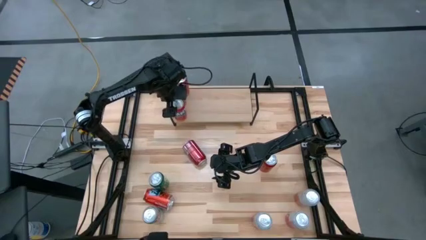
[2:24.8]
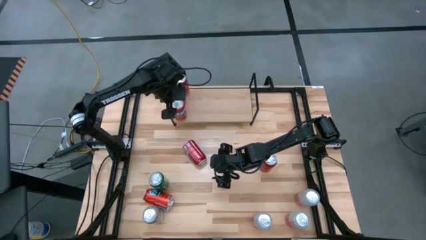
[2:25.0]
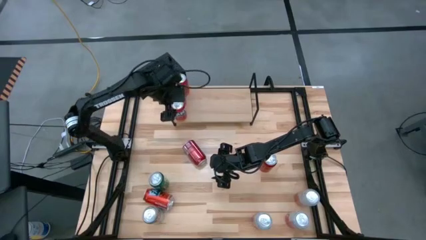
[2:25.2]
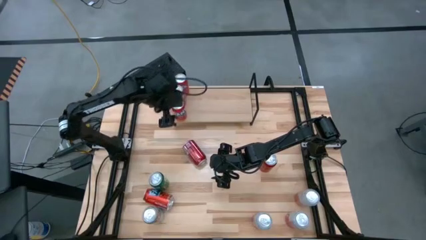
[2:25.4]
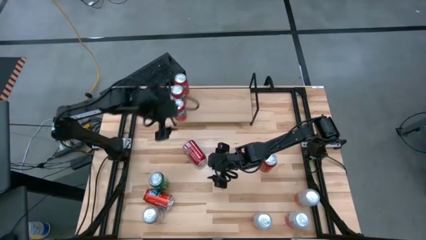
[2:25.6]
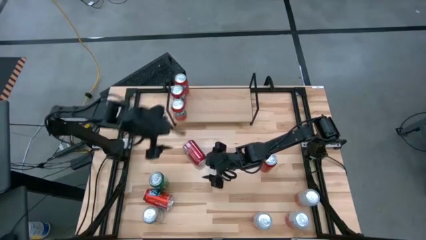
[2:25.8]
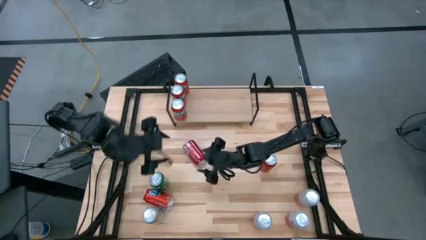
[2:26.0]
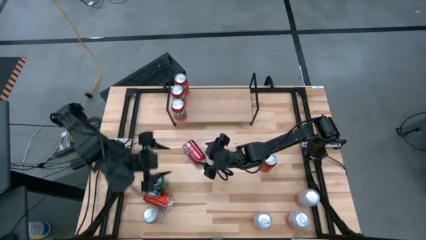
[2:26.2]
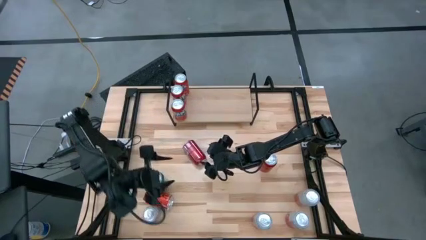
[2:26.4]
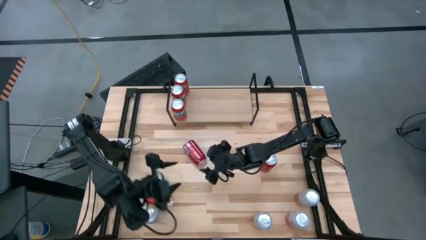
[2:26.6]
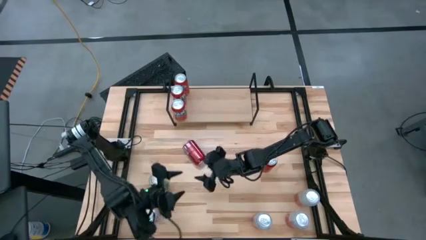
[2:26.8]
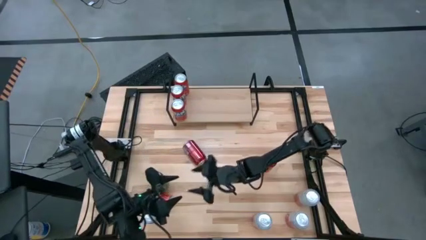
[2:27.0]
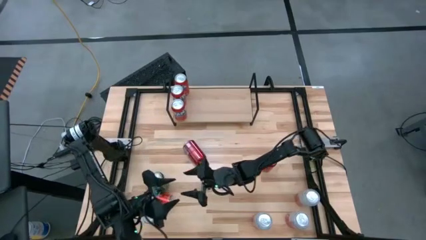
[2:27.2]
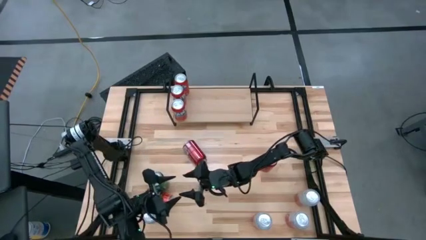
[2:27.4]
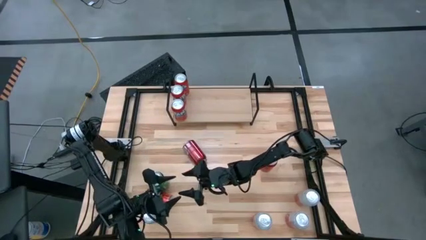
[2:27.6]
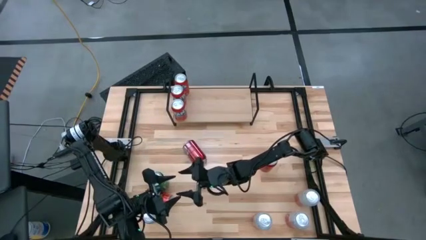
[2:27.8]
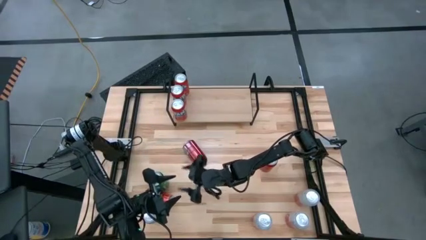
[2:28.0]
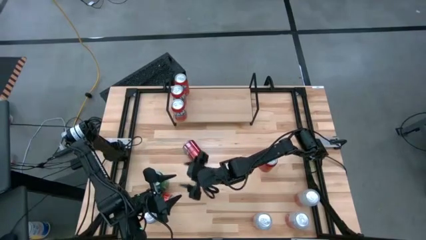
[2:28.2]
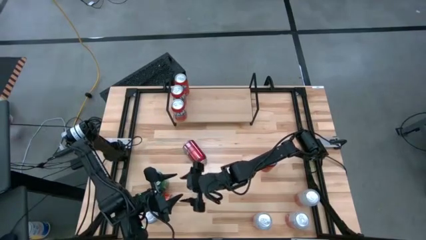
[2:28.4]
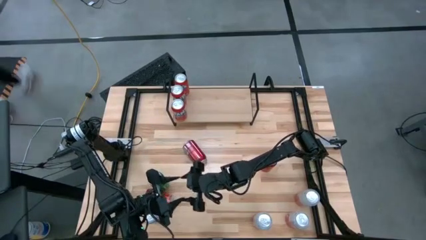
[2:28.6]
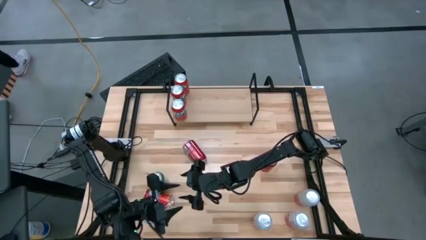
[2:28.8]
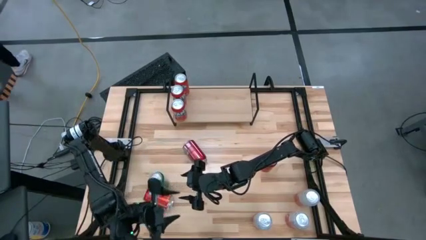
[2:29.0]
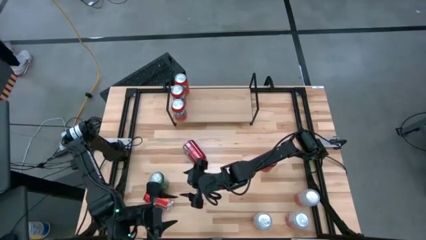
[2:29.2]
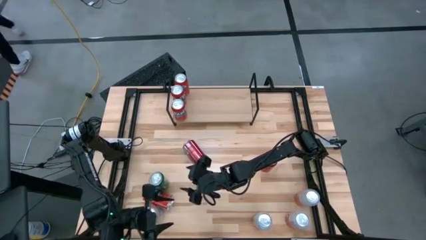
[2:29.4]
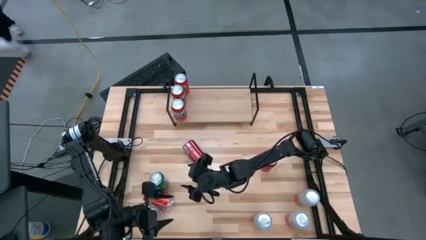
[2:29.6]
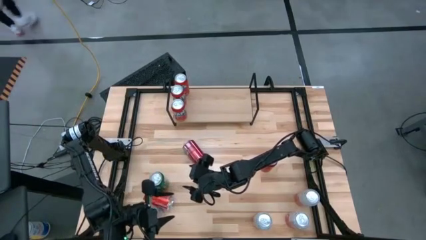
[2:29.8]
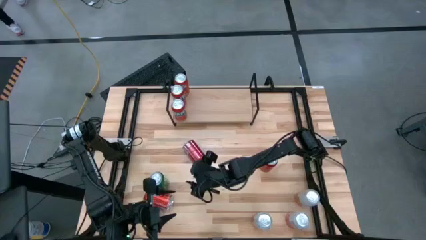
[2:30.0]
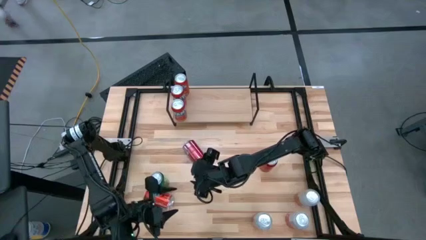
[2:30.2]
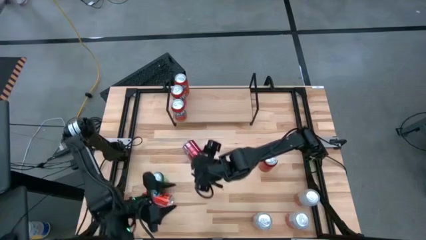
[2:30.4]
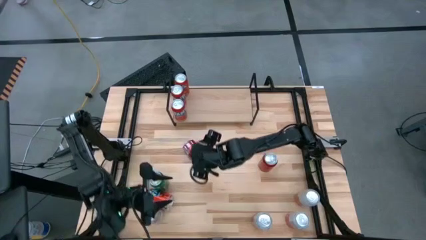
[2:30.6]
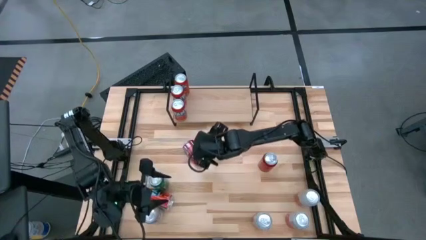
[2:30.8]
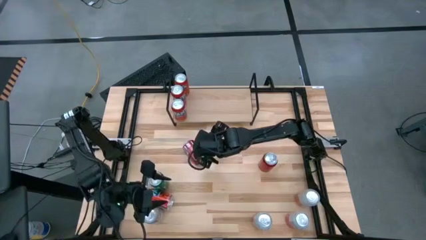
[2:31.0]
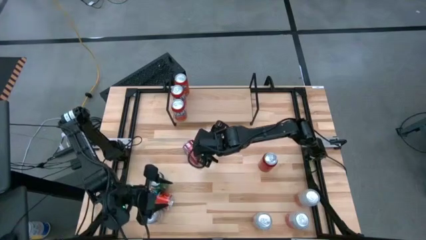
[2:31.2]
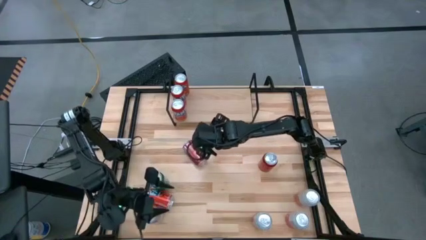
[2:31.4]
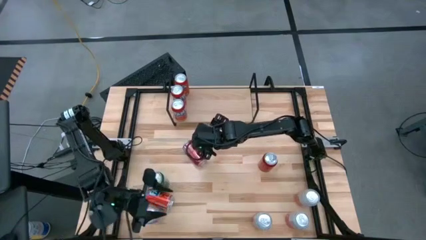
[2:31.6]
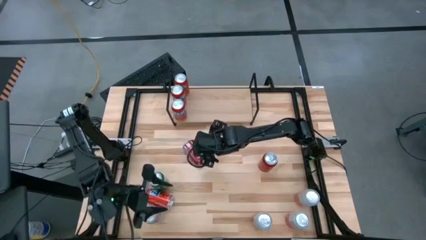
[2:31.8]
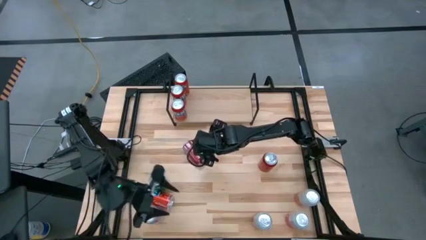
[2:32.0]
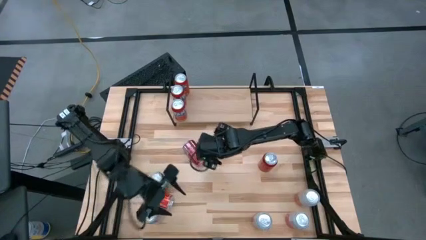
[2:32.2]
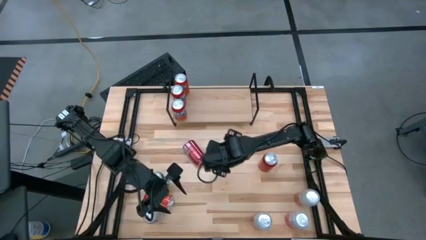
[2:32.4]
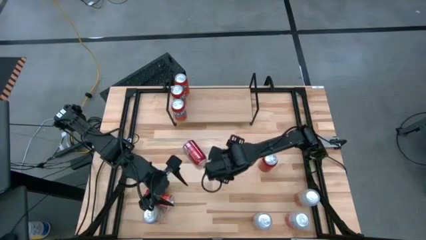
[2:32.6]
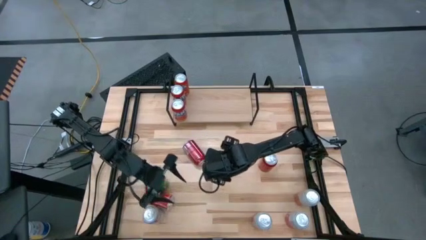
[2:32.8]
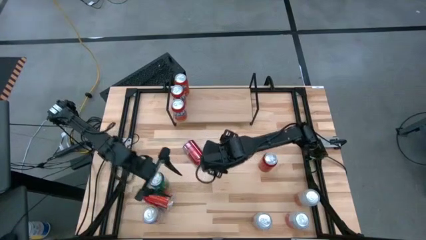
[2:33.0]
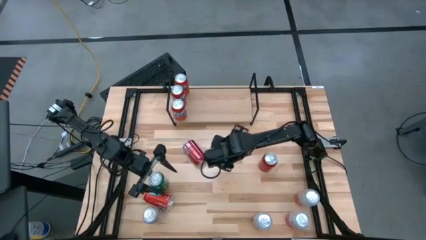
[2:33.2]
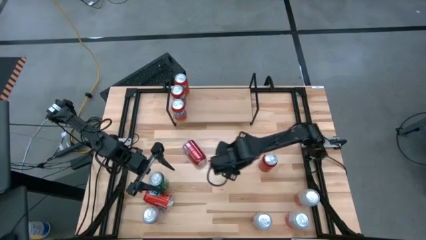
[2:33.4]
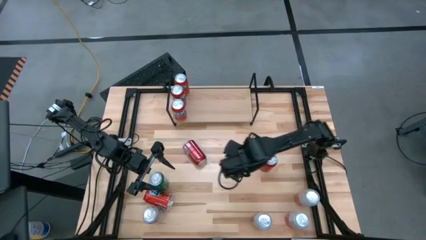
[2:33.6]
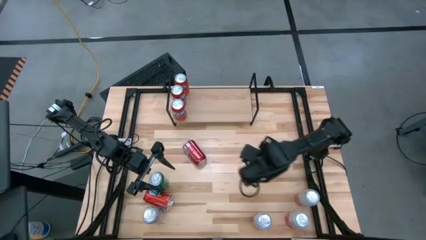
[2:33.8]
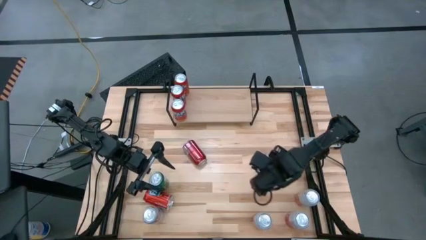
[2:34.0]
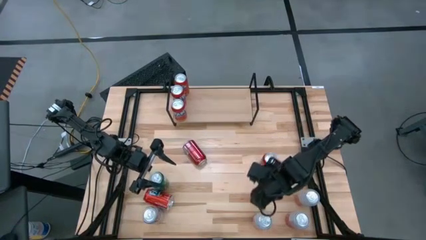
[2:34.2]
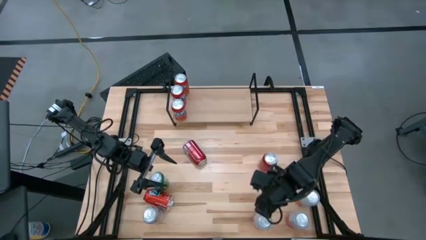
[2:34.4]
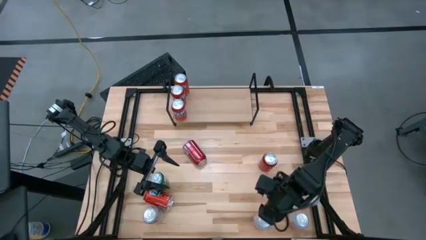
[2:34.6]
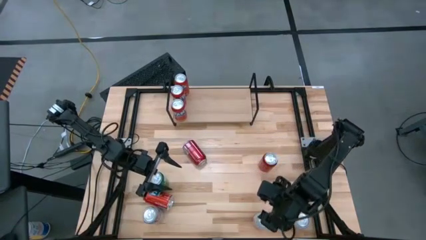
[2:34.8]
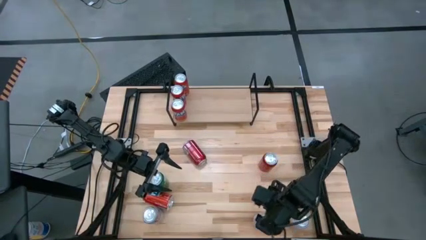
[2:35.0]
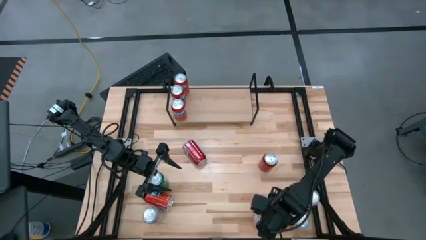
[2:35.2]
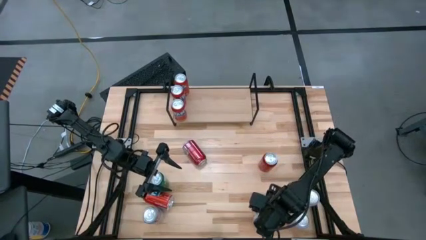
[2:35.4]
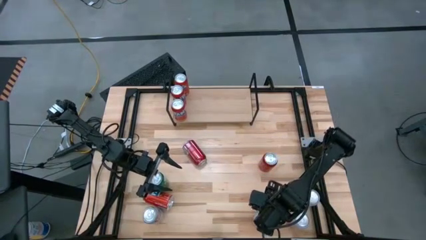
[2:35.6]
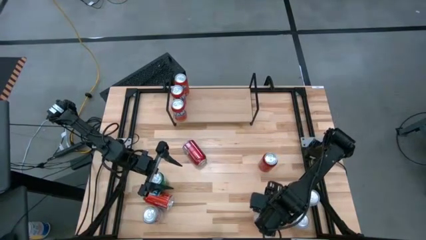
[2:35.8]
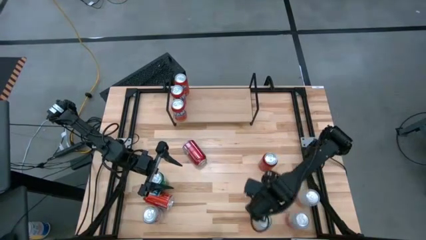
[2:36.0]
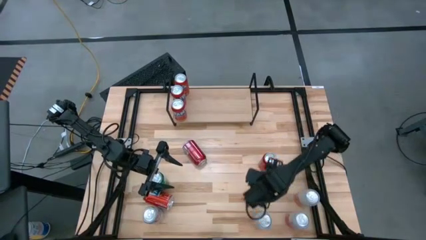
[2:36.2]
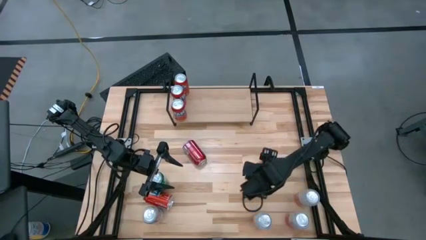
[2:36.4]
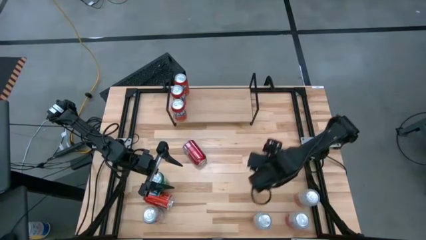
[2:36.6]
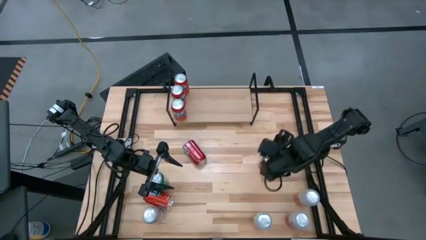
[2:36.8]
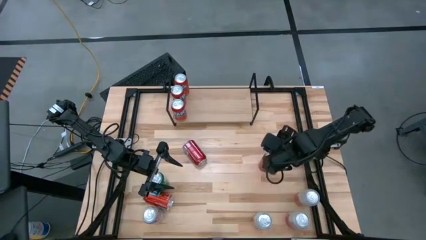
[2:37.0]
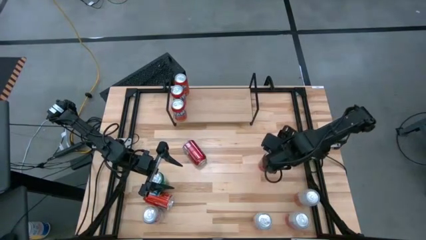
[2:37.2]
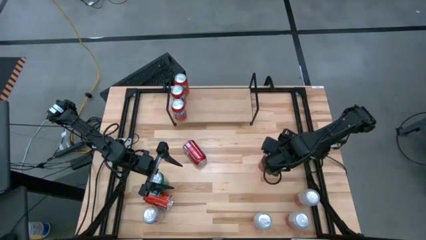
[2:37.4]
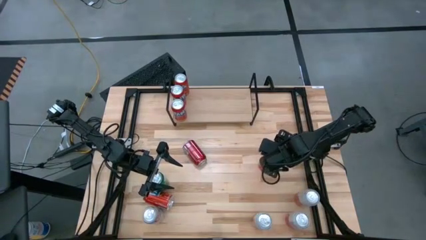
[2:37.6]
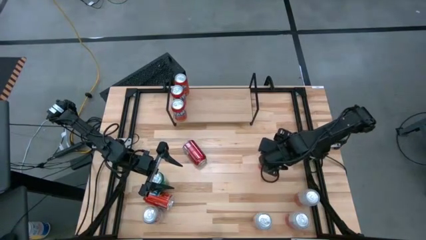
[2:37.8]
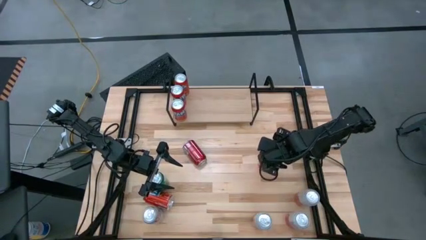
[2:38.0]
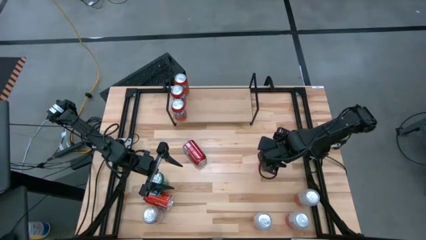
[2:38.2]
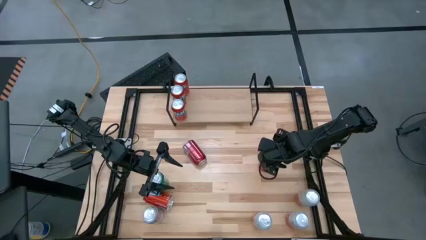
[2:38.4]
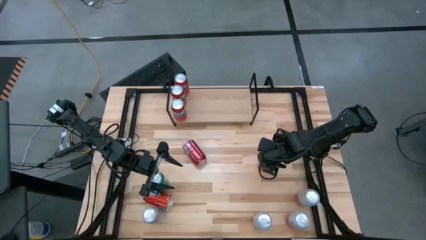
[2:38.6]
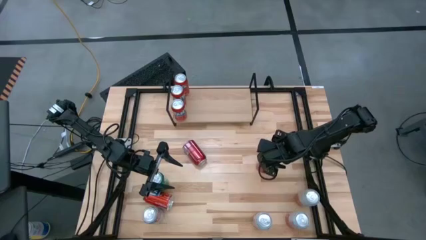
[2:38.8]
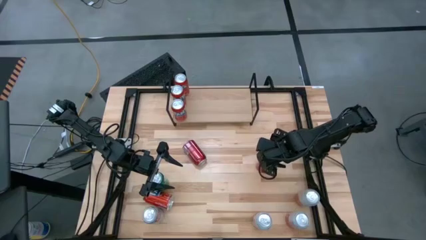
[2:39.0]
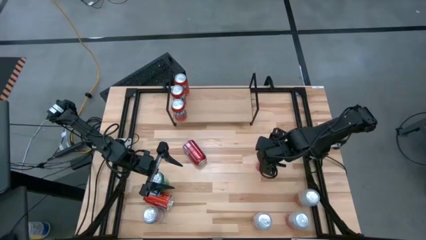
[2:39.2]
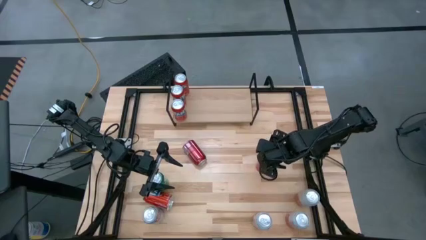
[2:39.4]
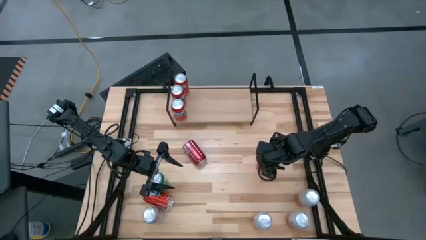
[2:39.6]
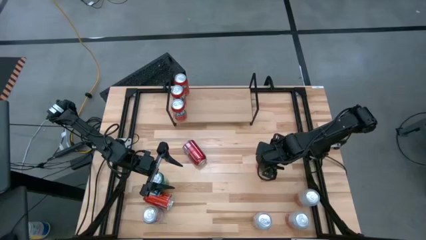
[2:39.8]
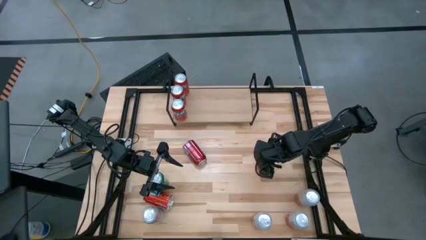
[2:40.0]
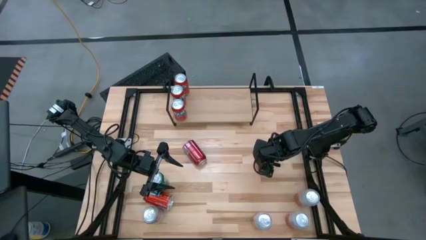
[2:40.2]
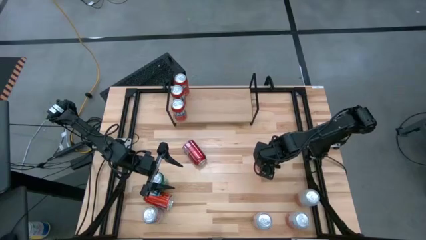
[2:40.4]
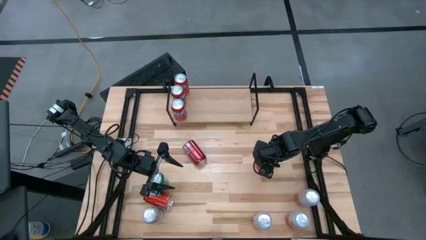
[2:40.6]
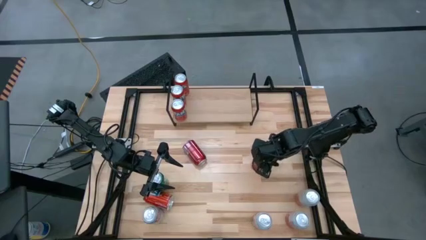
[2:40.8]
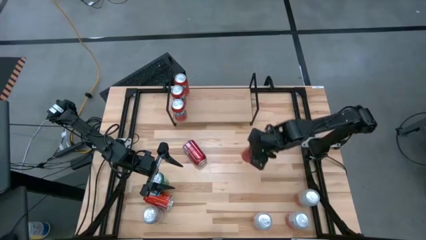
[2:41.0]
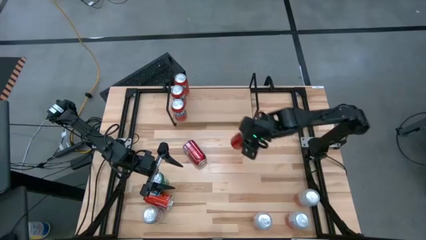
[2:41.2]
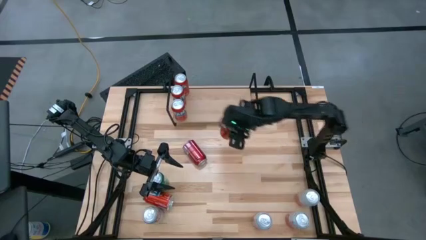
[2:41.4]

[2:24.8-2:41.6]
Task: Place canned beverage on shelf
Put the red black soda can on the shelf
